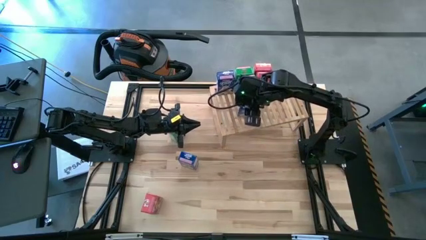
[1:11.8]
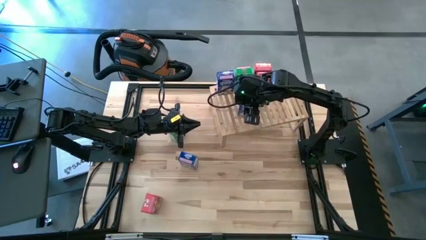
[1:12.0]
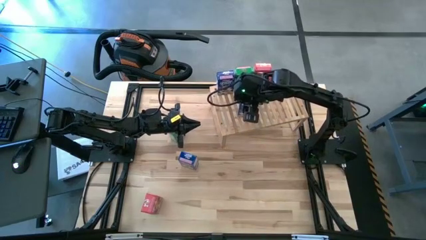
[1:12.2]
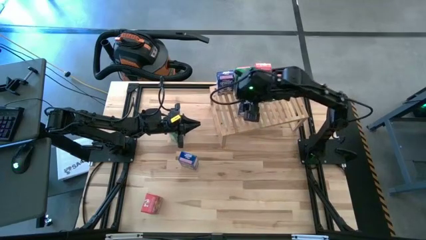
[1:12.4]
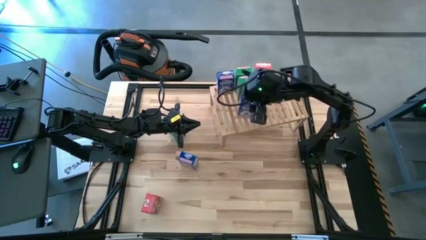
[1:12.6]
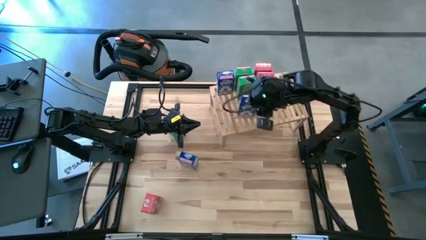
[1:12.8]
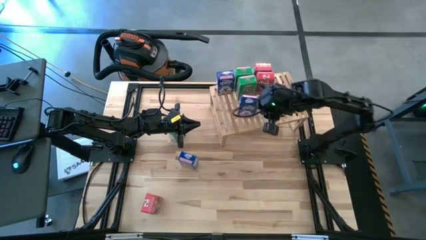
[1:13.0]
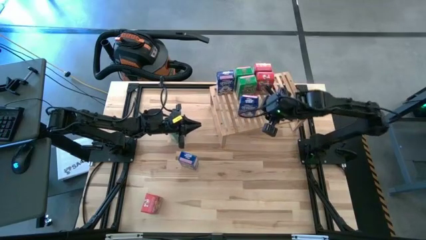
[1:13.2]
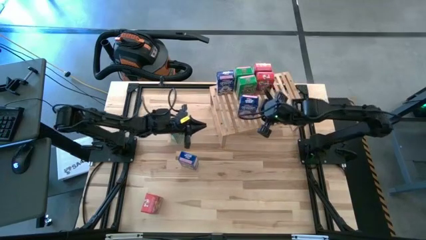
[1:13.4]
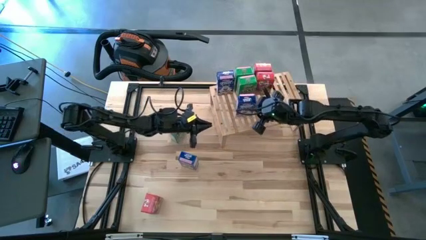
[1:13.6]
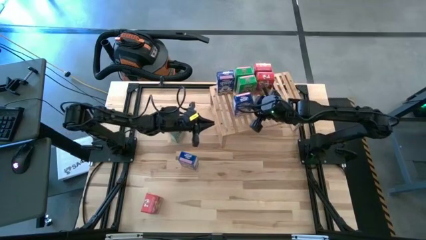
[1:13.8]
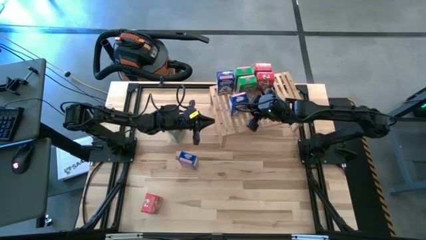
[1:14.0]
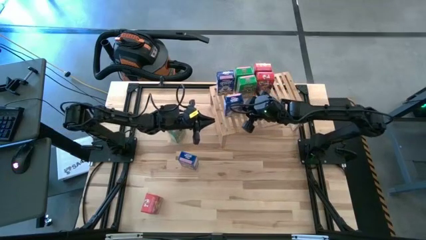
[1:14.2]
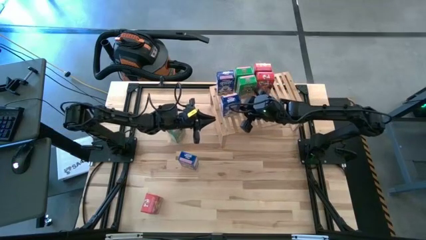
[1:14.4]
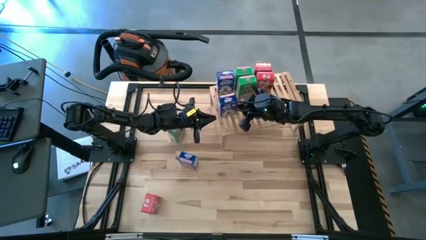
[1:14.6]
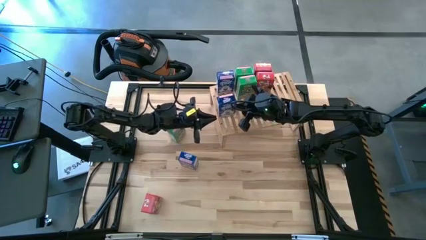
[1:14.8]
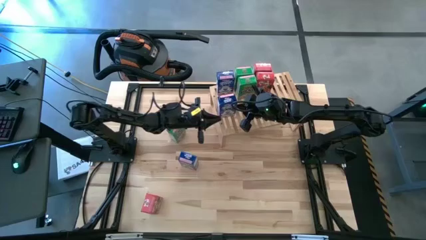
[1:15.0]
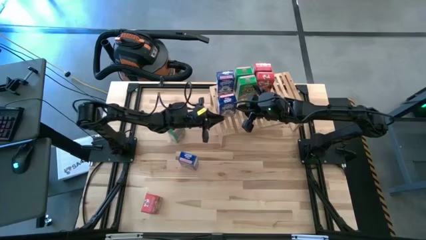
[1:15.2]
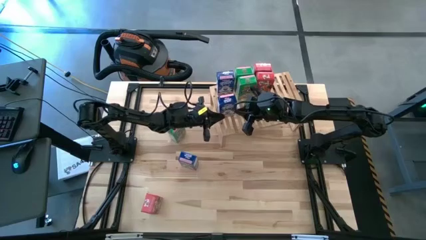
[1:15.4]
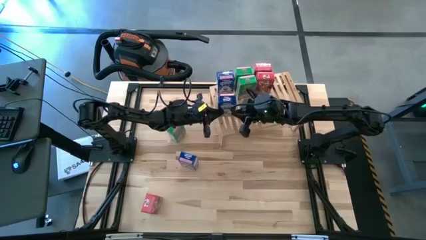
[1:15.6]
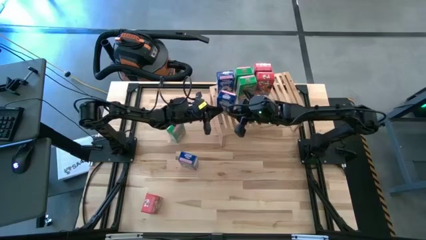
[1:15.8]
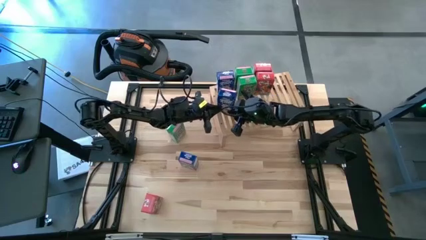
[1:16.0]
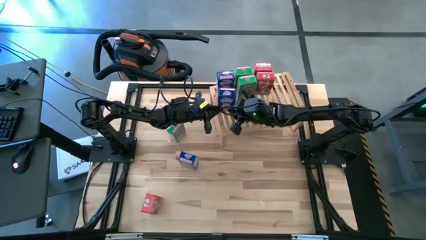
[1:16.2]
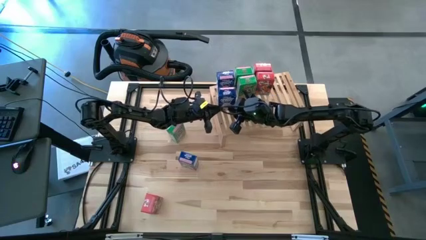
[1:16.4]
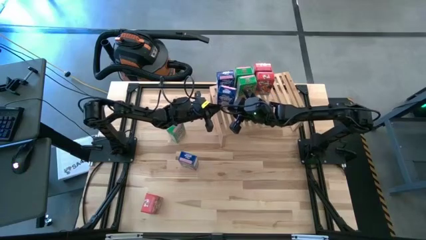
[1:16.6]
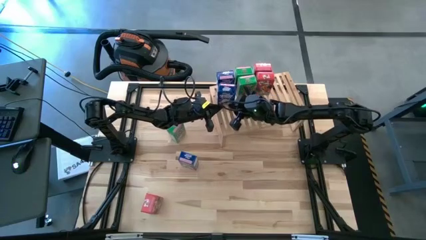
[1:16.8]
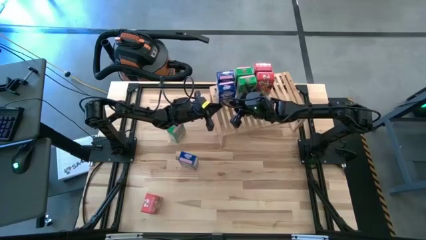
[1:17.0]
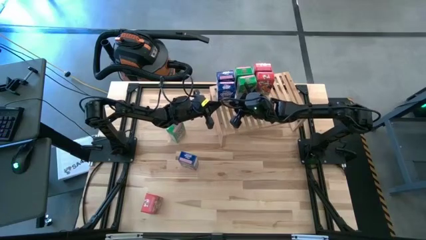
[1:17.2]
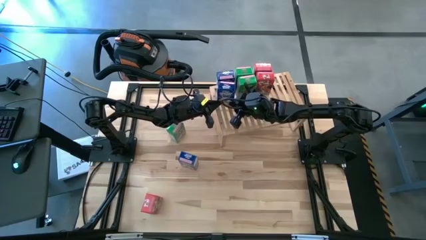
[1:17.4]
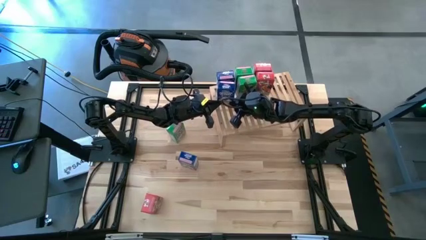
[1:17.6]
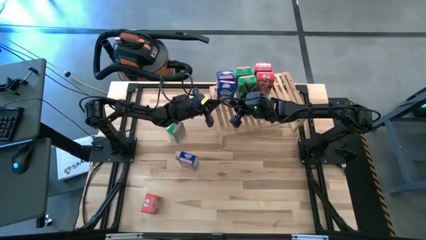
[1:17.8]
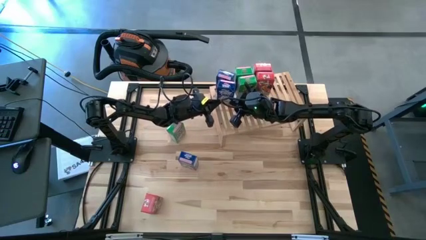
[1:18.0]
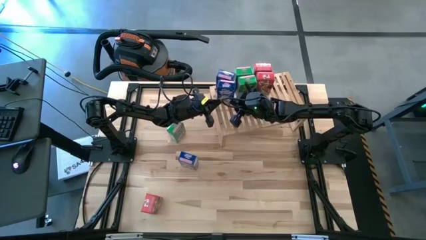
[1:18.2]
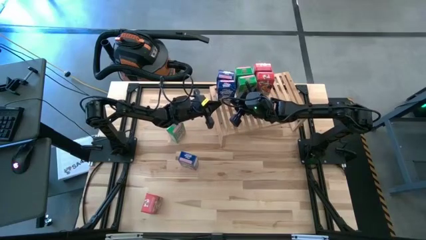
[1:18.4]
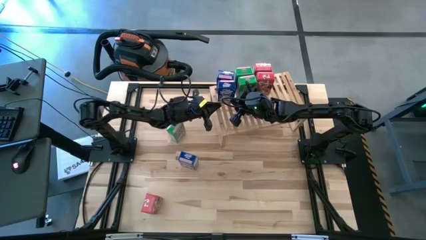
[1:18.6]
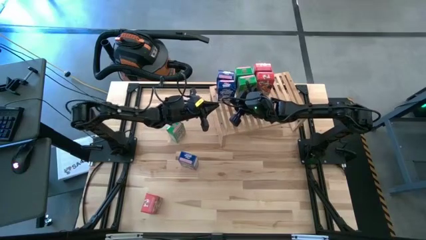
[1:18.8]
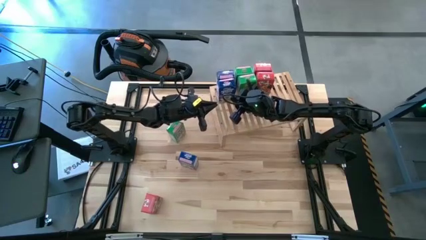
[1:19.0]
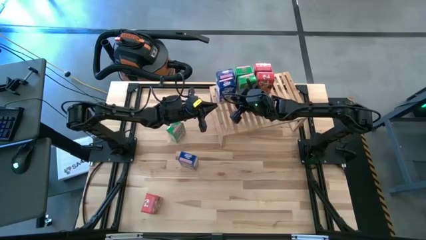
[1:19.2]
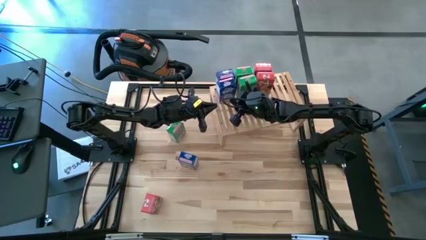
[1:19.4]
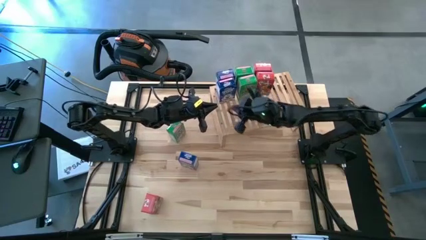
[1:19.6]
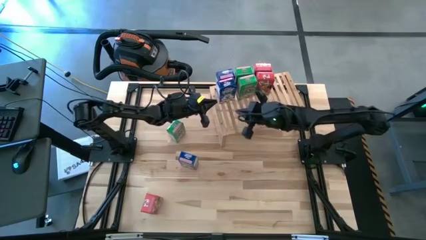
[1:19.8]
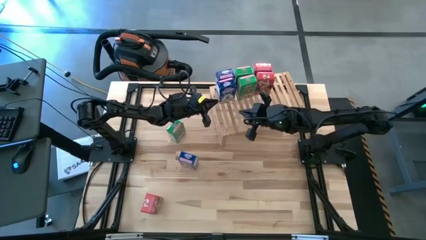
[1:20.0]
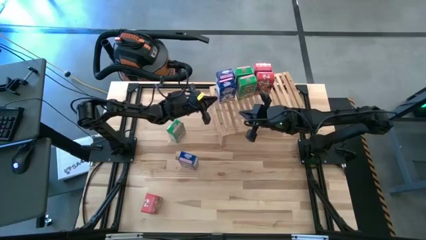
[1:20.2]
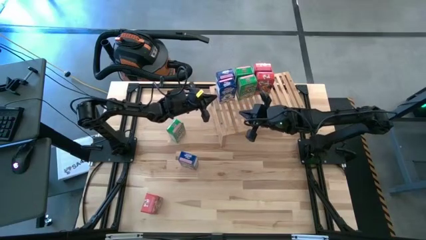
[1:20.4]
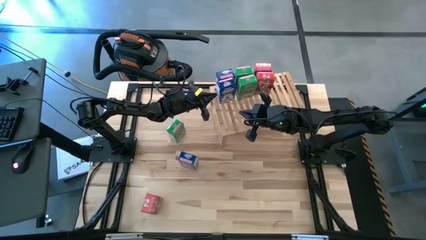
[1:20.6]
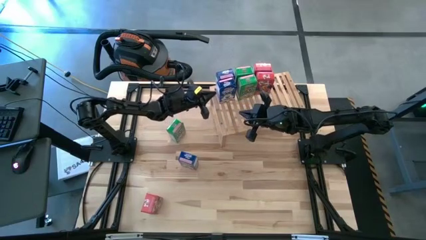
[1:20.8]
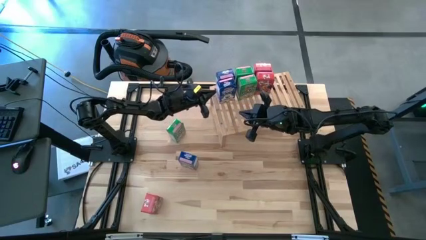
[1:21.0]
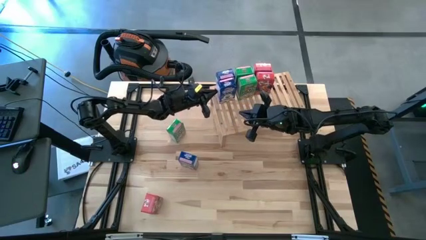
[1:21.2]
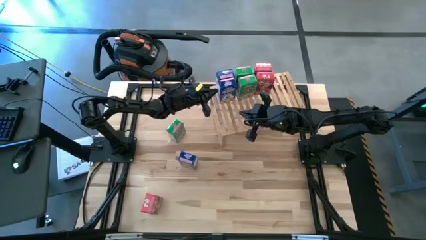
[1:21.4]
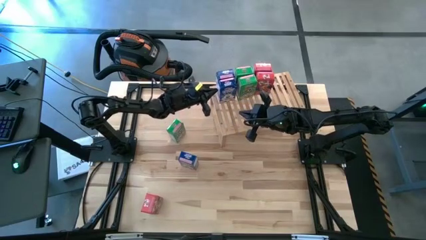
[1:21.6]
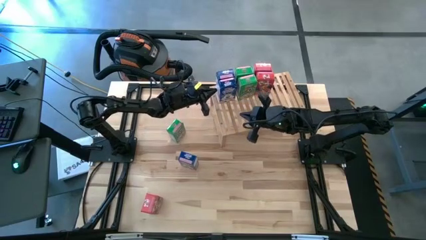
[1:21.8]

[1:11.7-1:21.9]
Task: Stack cereal on shelf
Put the bottom blue cereal box on the shelf aligned with the other blue cereal box

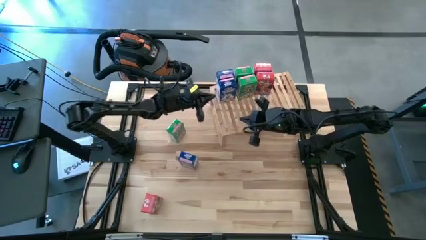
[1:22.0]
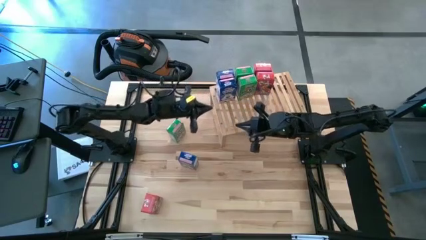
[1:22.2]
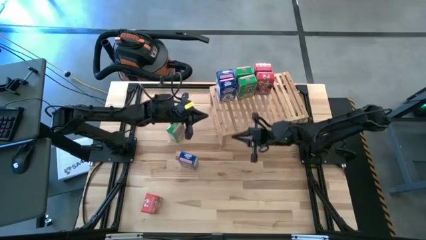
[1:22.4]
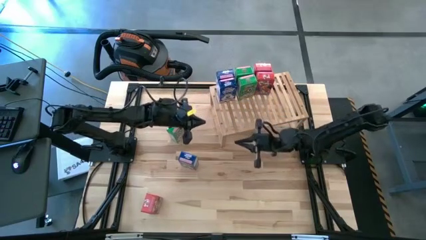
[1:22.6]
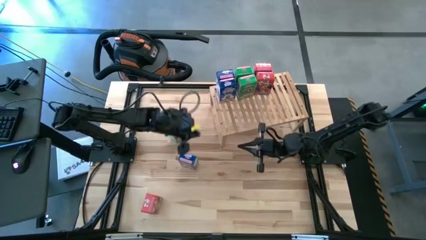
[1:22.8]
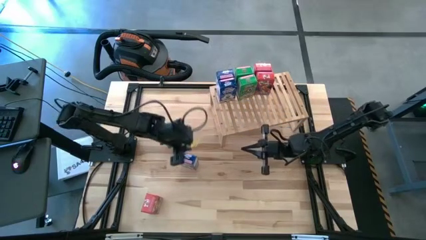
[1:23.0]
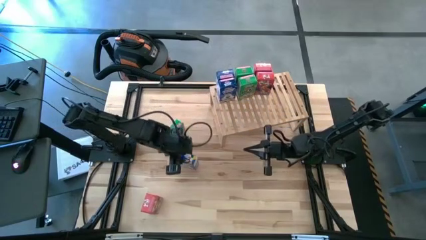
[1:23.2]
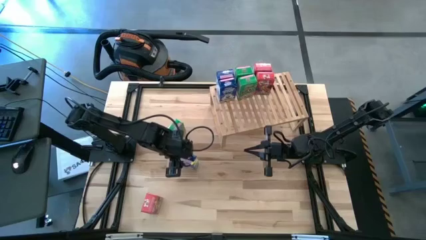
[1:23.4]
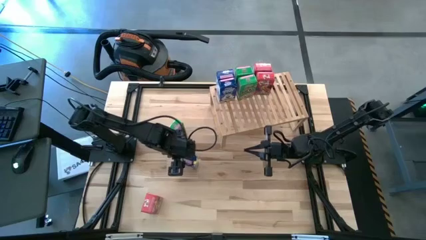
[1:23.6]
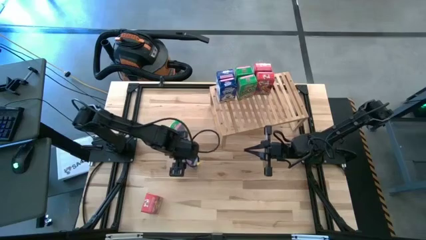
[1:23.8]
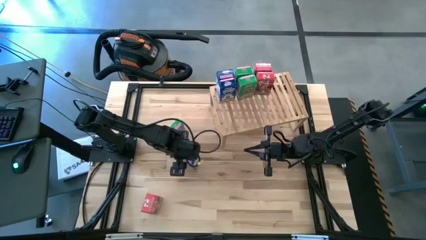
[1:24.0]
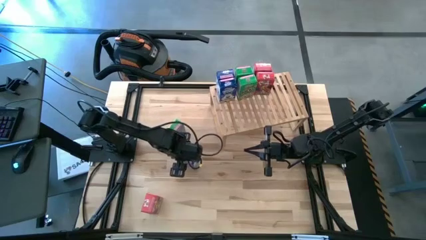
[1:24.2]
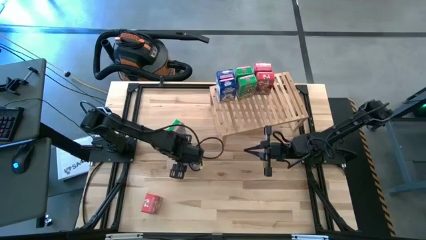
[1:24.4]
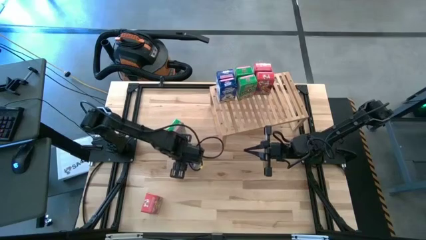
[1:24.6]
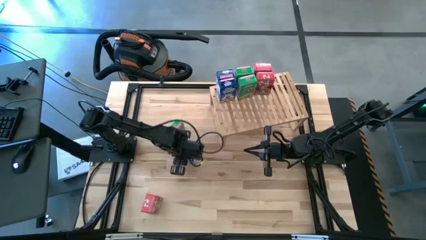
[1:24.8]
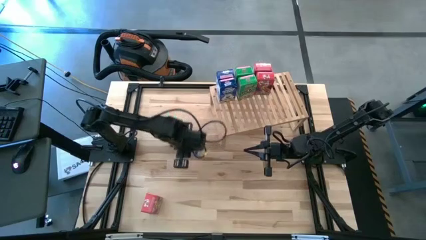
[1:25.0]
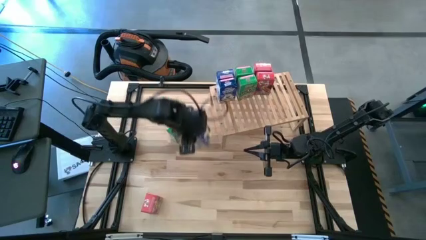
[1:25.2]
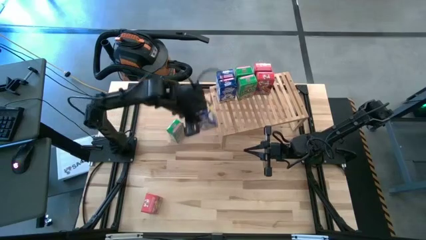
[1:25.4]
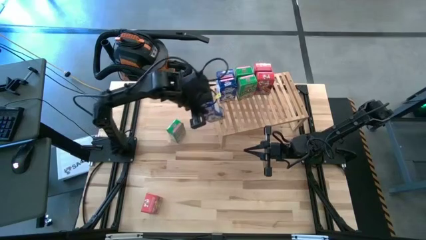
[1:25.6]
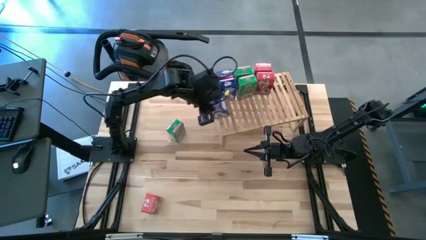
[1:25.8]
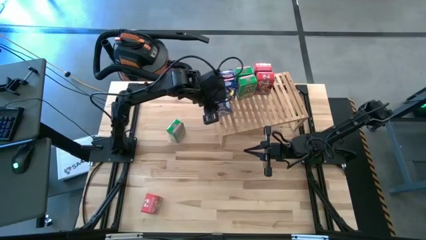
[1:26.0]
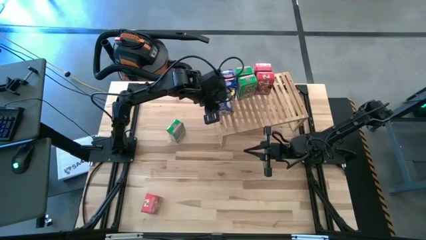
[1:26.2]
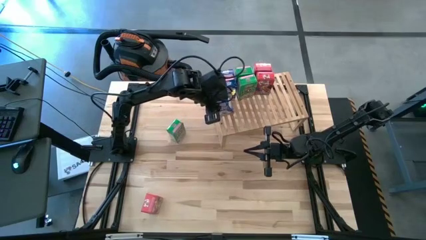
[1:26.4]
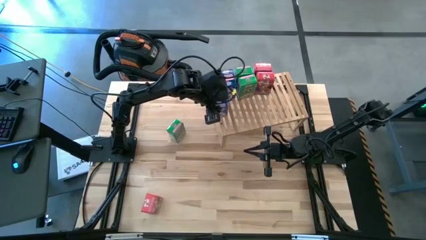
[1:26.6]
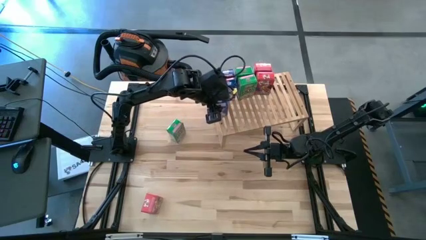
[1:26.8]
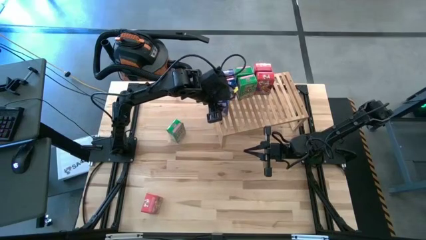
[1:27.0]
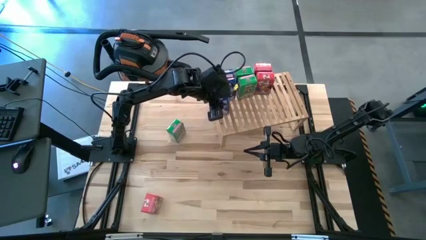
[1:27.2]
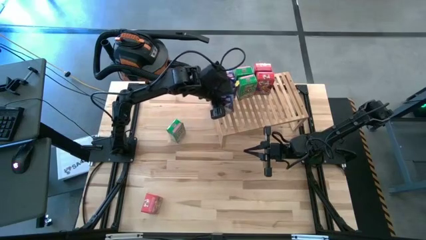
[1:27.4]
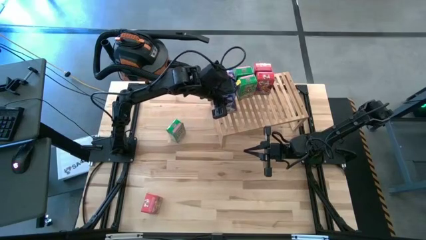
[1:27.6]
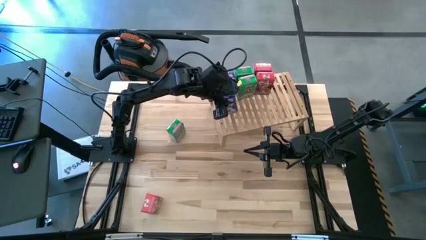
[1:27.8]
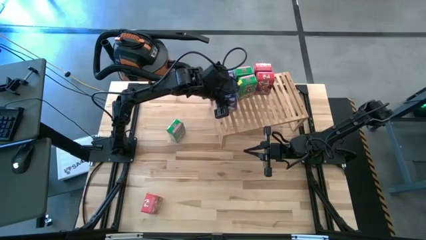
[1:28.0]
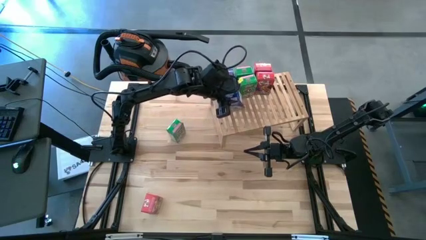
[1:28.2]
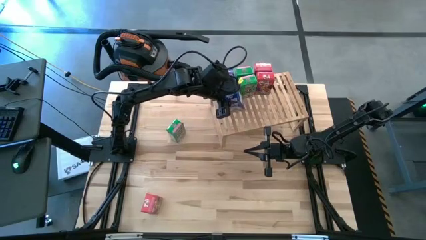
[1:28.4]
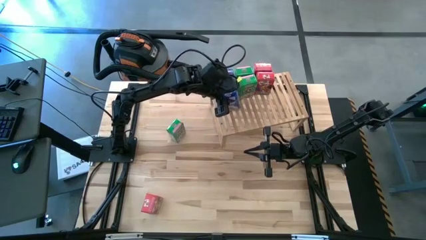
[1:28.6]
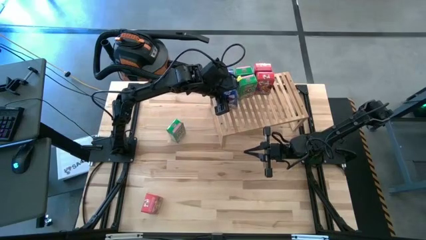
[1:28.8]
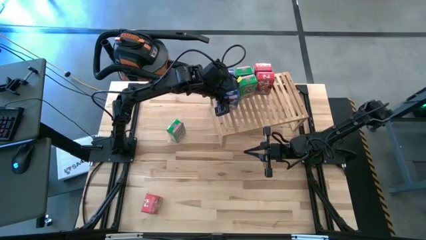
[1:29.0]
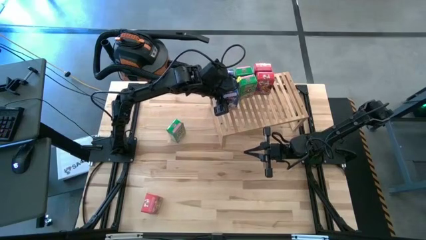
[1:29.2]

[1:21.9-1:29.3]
Put the blue cereal box on the shelf aligned with the other blue cereal boxes
